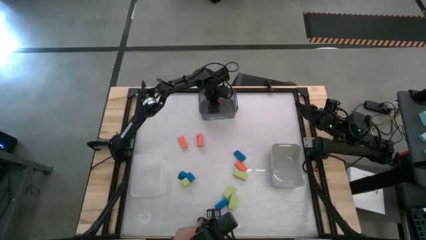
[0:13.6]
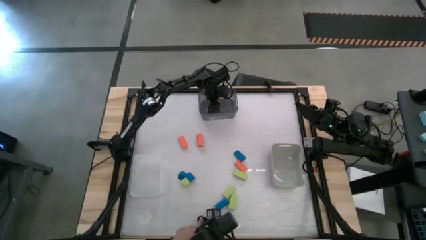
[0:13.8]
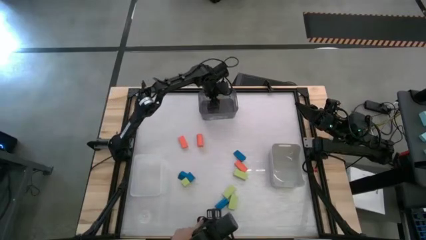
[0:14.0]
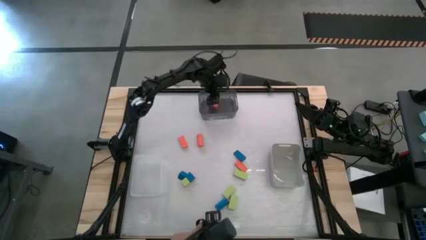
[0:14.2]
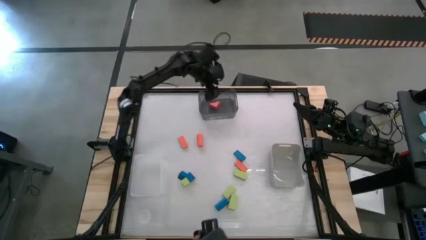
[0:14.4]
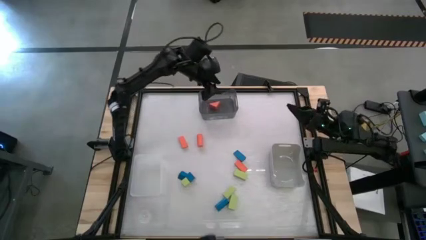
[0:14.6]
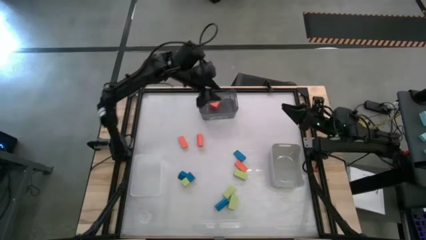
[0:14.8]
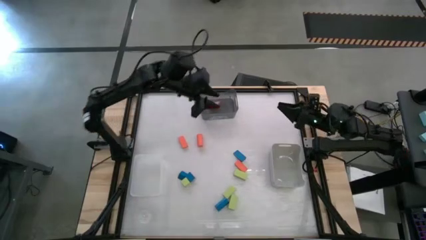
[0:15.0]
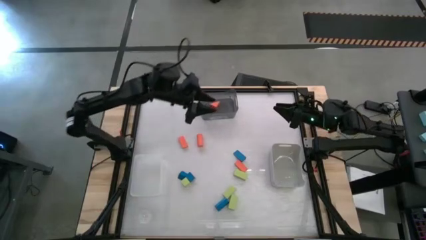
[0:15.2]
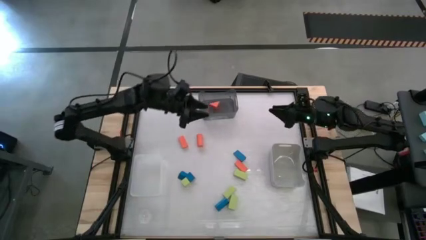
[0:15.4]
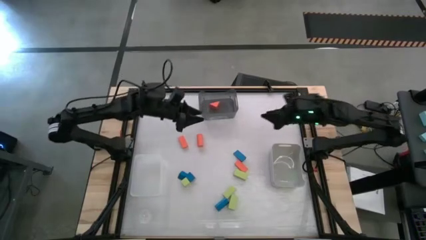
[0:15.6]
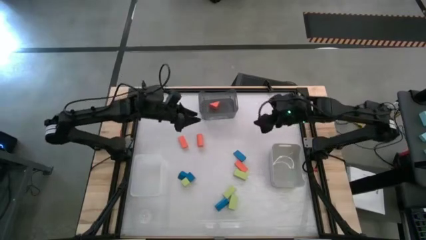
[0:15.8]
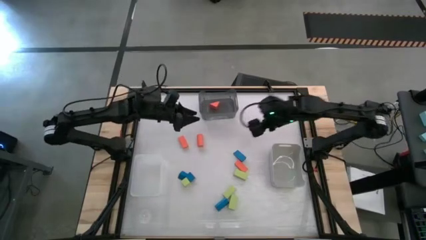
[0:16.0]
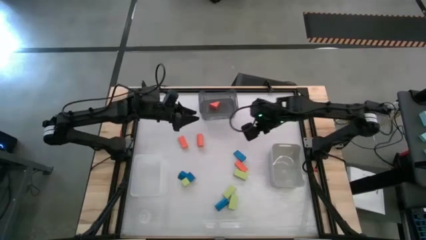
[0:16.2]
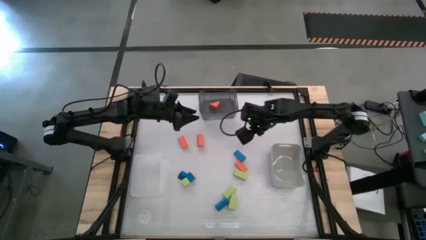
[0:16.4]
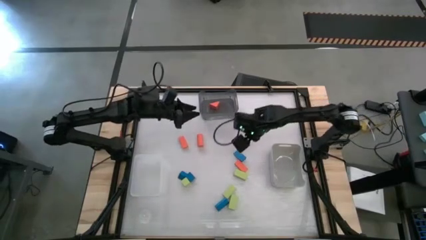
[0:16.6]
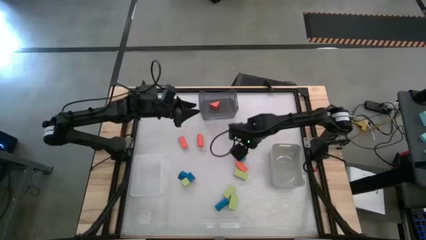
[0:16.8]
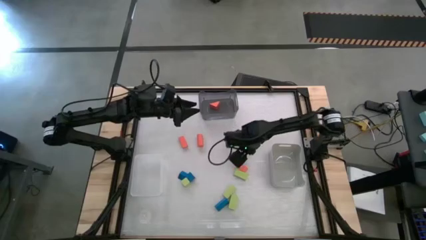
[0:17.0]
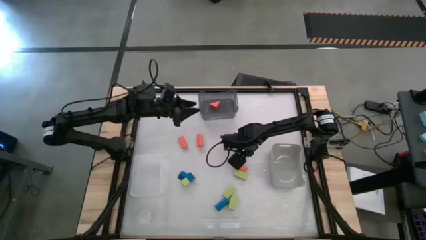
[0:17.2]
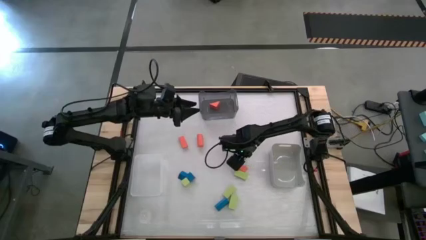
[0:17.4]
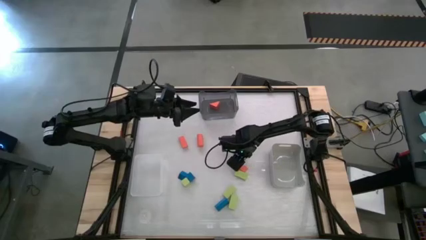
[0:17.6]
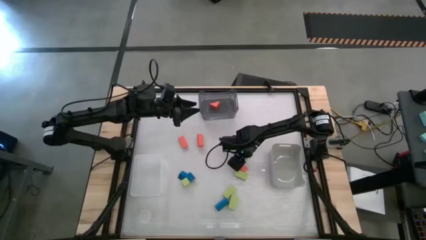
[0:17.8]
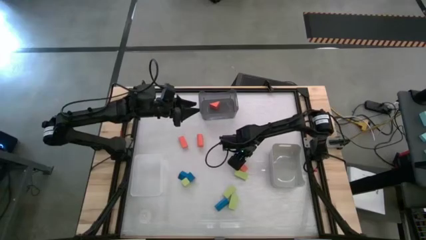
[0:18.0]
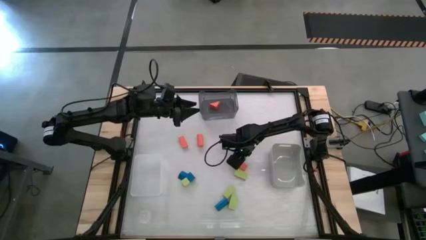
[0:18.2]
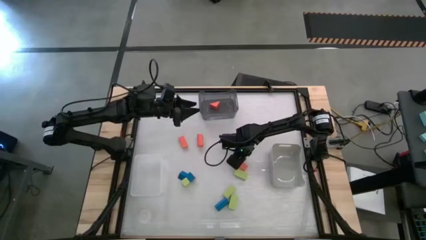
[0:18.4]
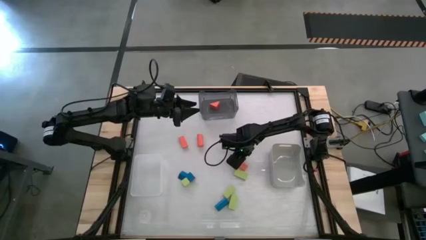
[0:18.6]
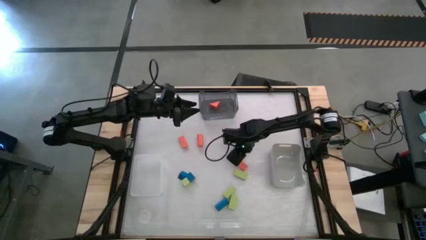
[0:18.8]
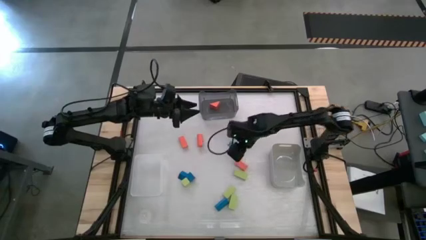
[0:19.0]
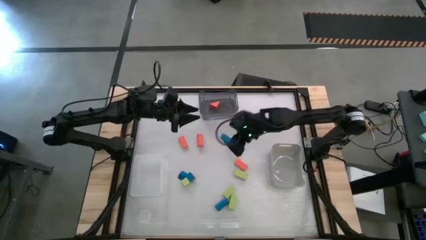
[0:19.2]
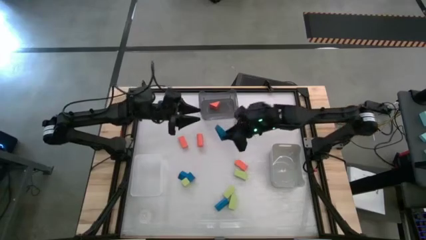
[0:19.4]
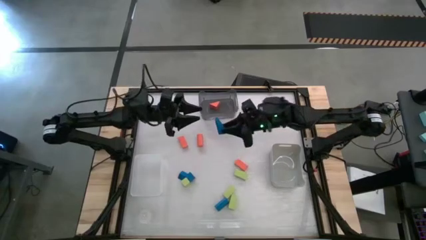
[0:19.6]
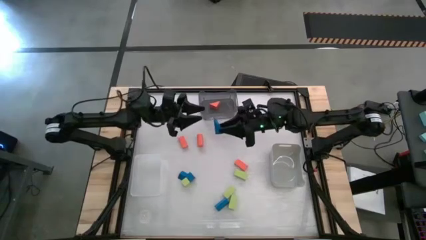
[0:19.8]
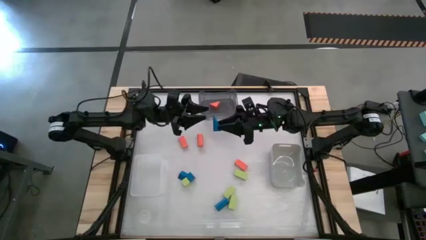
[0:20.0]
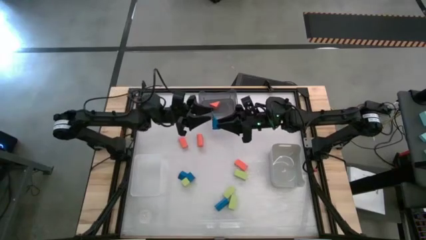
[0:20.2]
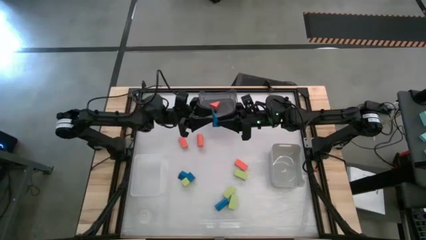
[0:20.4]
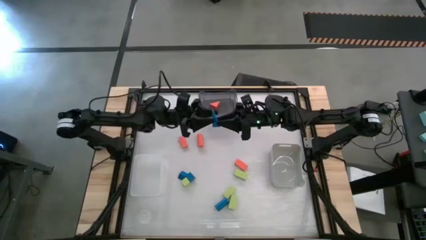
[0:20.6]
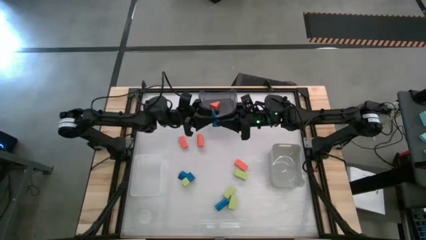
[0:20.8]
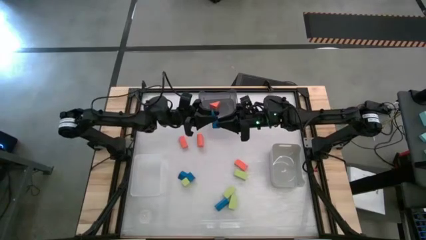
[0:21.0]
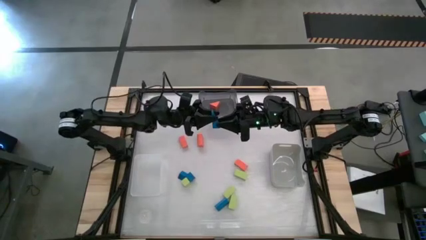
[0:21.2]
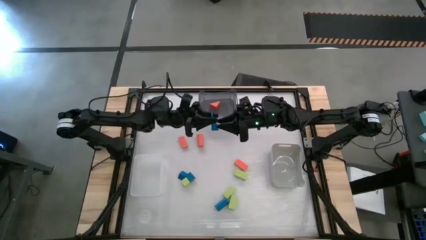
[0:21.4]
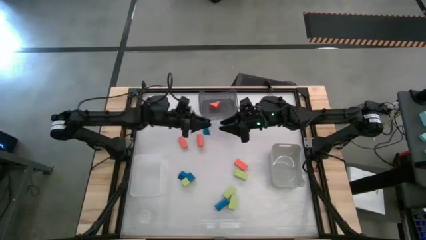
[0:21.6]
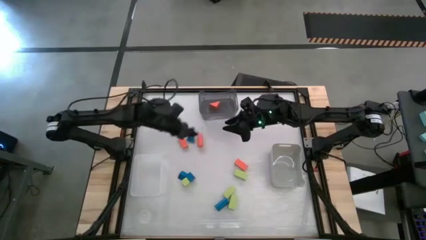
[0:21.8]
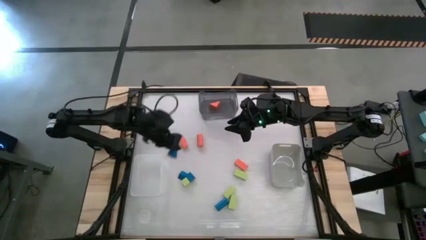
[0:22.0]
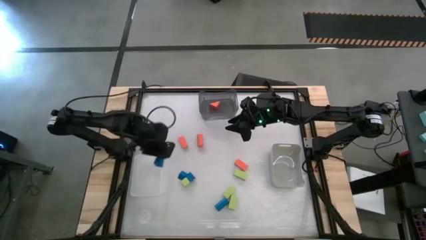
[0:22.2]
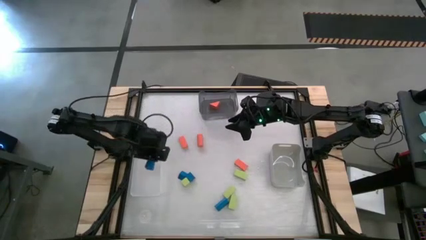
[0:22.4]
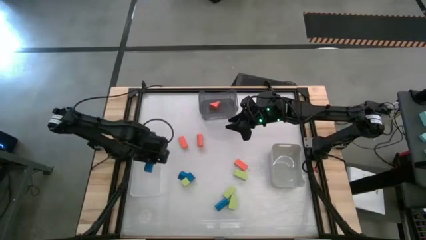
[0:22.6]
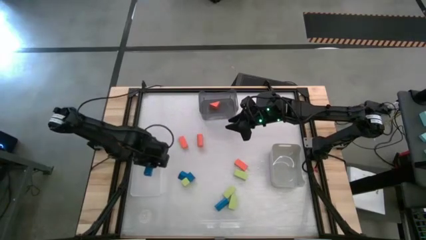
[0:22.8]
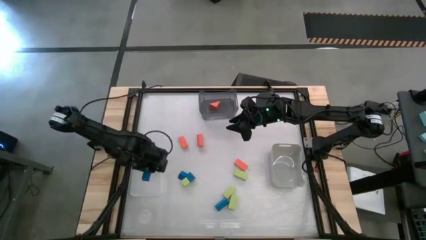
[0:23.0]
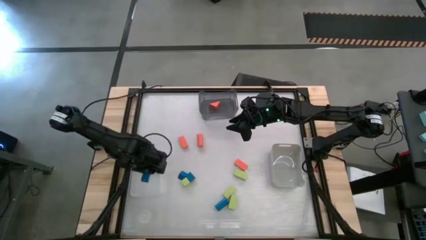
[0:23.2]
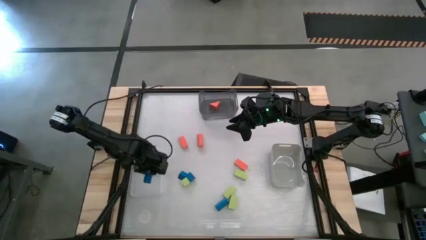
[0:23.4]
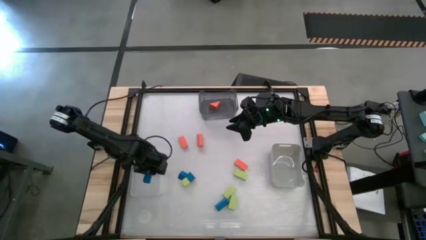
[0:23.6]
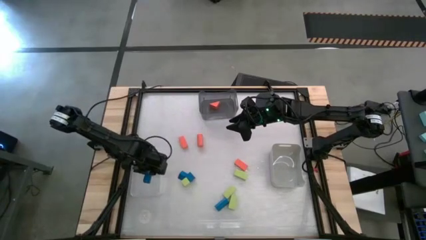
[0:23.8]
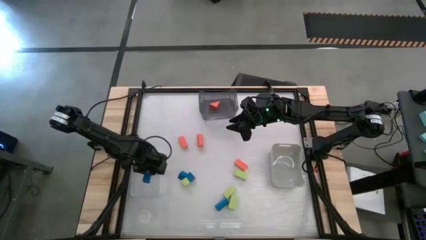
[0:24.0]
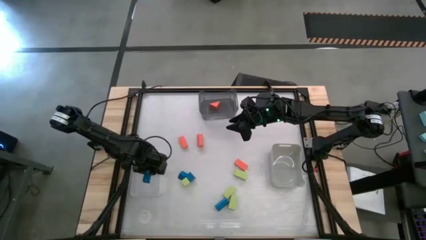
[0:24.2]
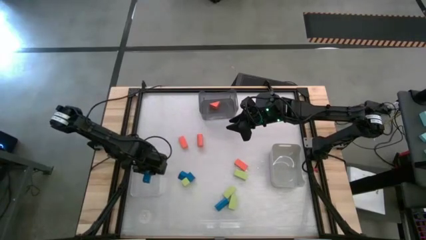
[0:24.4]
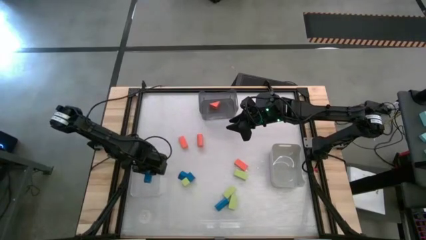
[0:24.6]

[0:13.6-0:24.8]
Task: Sort & place blocks by color
Put the blue block into the white bin

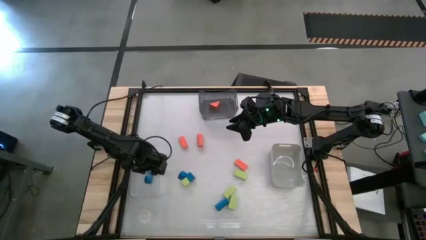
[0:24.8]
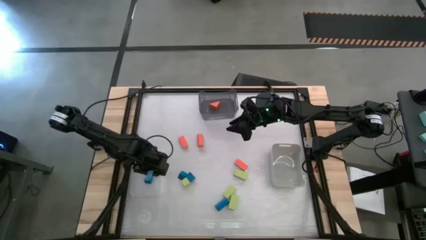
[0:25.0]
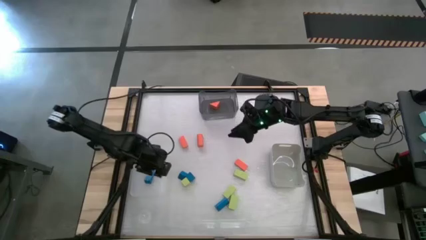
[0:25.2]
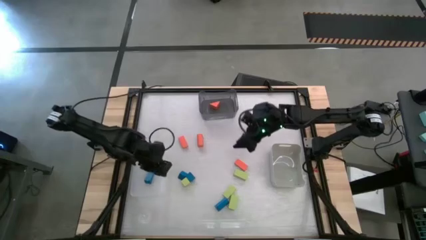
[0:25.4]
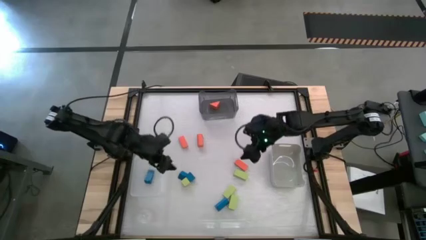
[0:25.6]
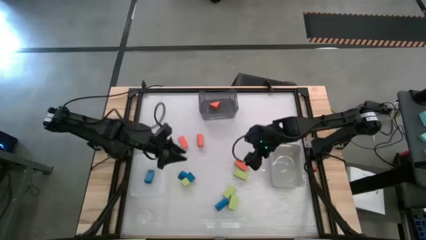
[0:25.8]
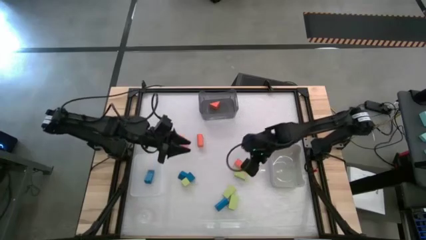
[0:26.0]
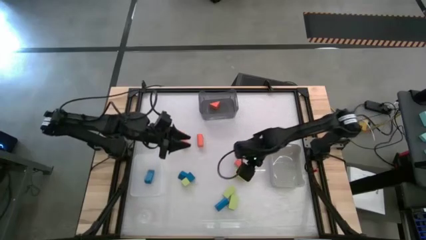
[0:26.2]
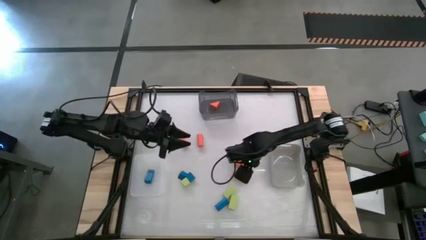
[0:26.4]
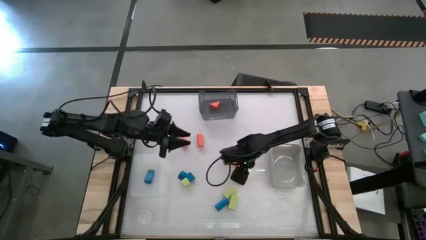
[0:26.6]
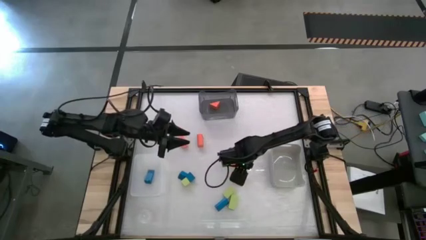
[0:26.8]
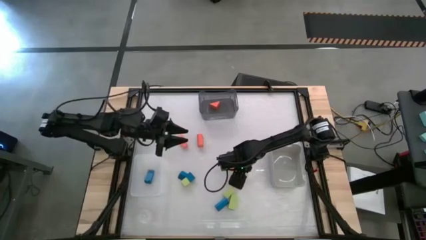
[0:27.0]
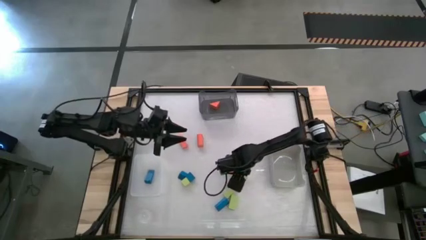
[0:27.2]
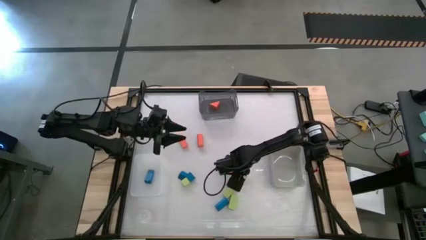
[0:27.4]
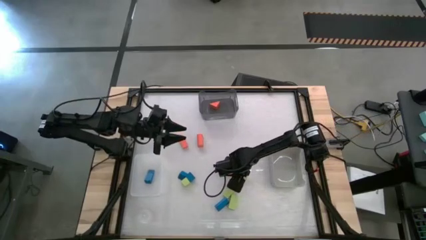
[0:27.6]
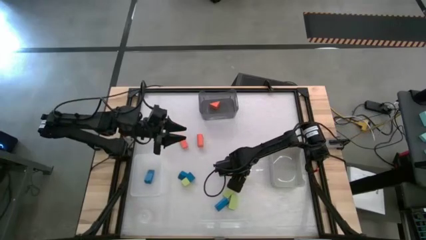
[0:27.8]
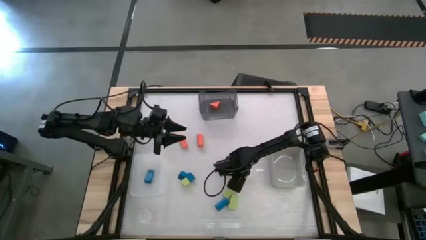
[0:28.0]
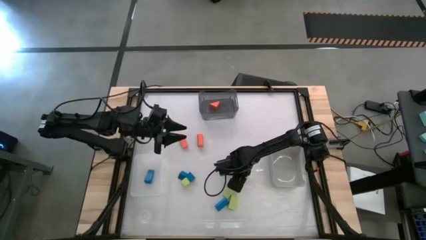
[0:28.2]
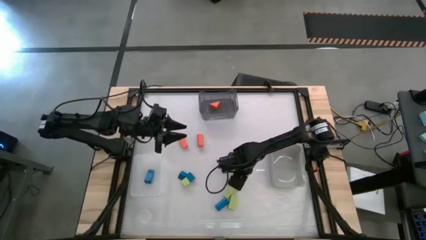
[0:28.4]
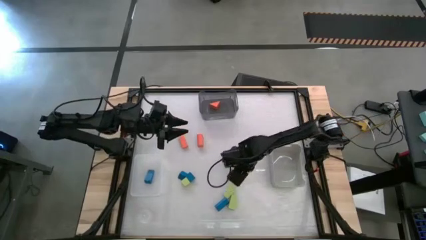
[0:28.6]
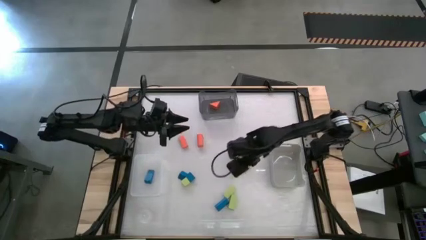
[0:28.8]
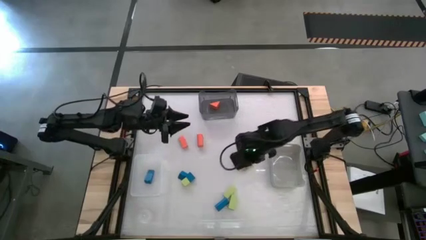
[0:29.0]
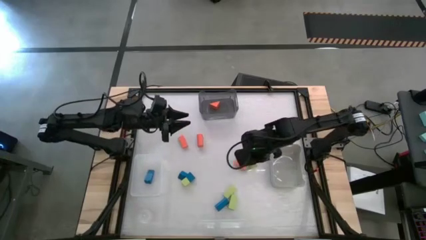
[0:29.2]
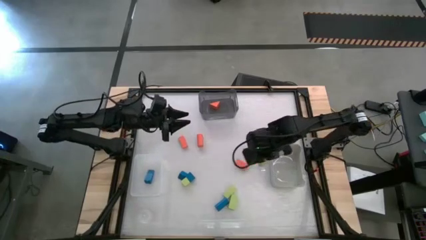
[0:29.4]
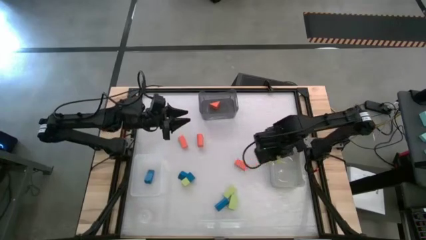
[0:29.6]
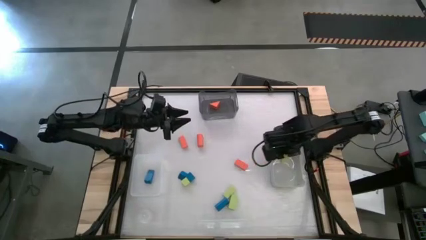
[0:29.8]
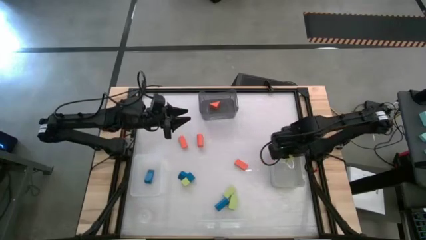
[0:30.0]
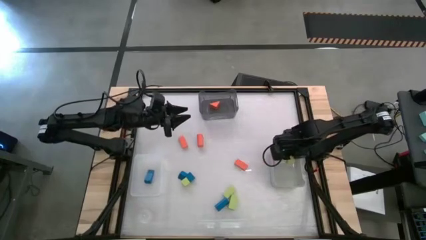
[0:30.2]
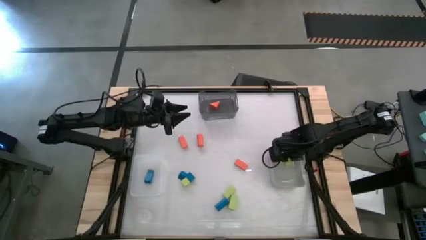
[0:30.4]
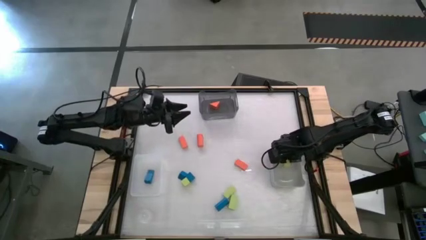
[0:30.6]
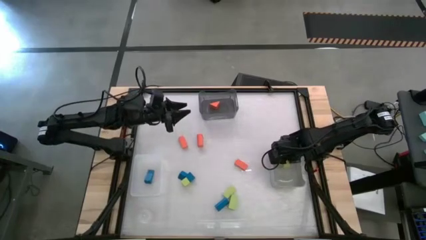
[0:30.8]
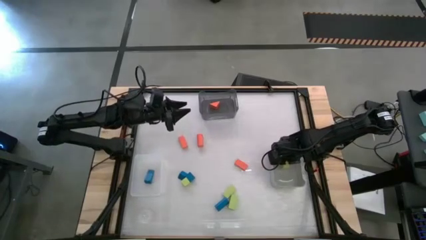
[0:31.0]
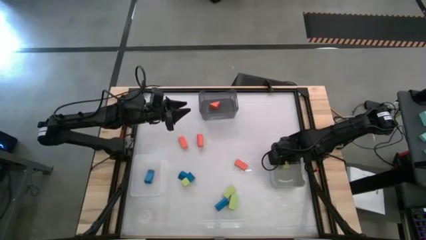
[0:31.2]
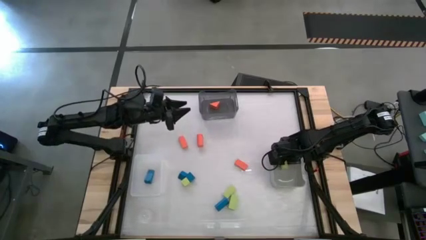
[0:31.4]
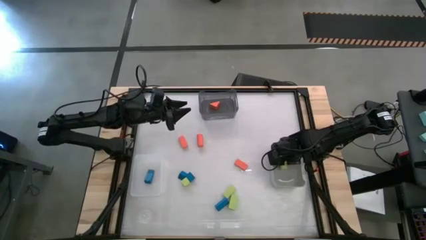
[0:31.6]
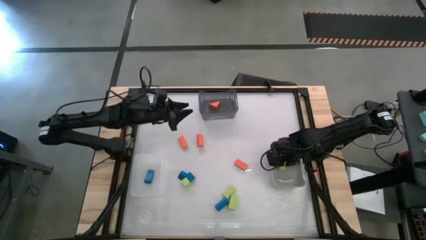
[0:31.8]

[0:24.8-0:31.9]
Put the green block into the gray bin
